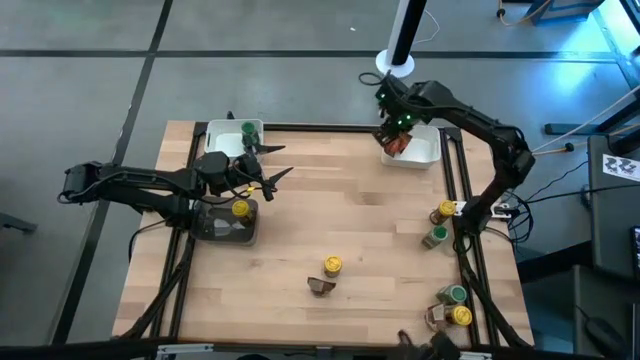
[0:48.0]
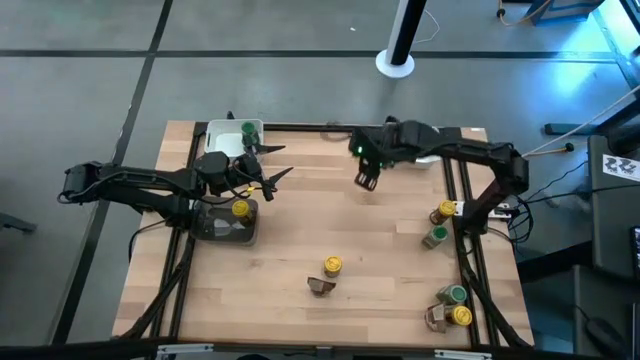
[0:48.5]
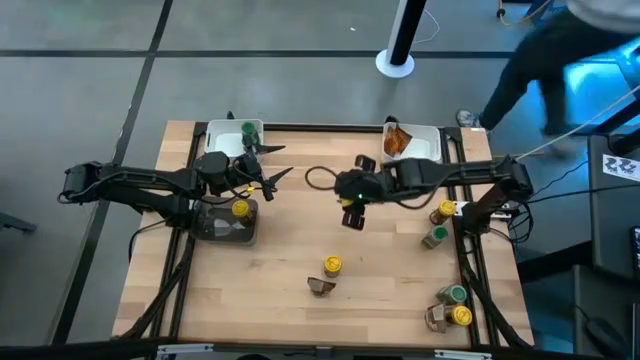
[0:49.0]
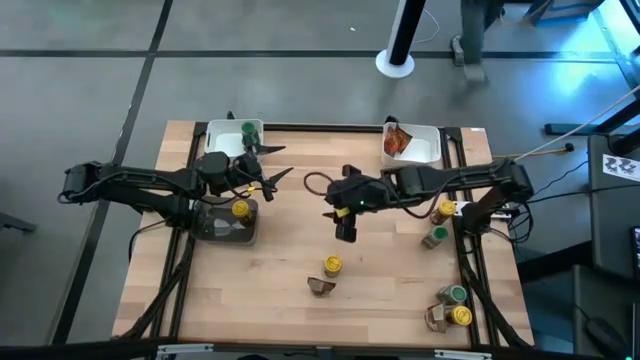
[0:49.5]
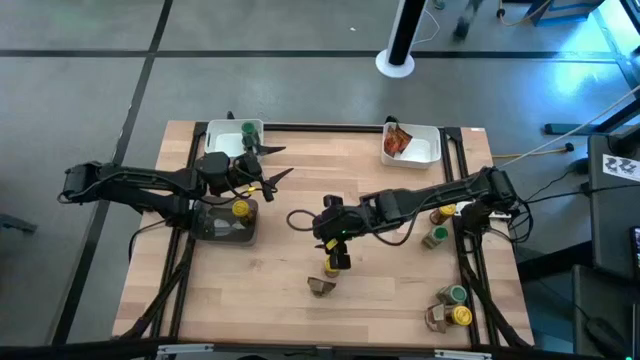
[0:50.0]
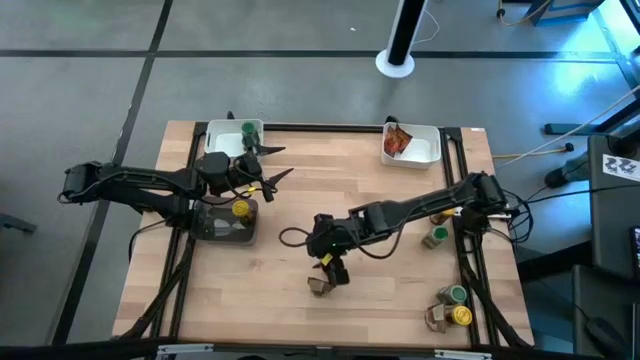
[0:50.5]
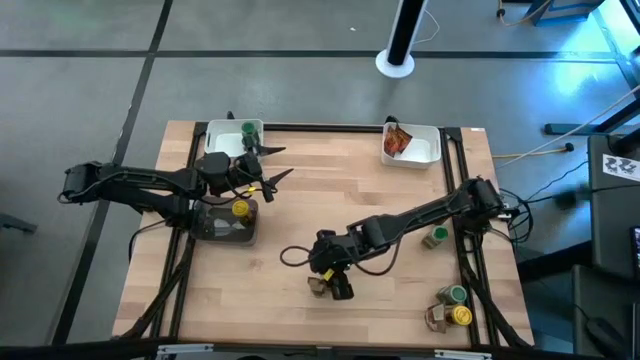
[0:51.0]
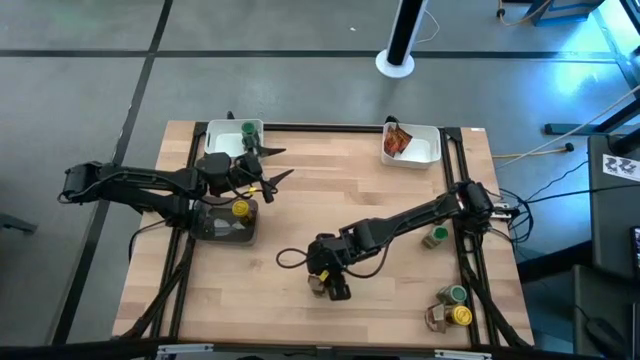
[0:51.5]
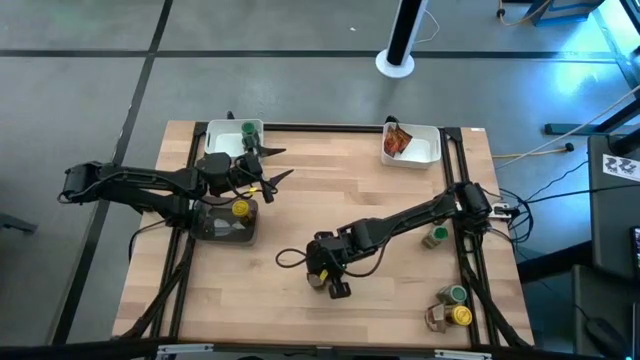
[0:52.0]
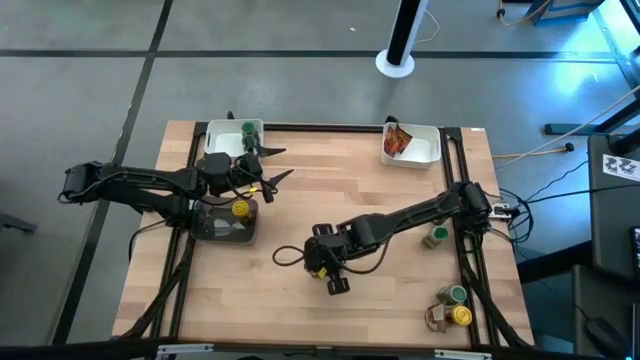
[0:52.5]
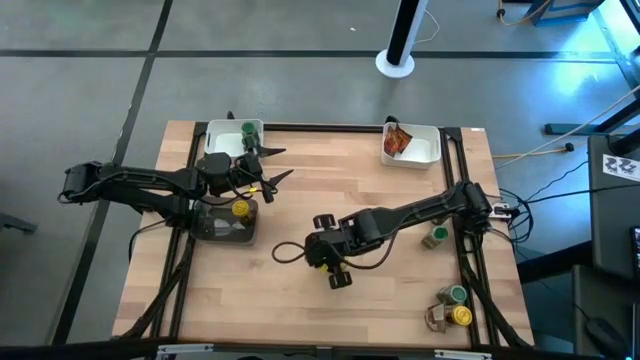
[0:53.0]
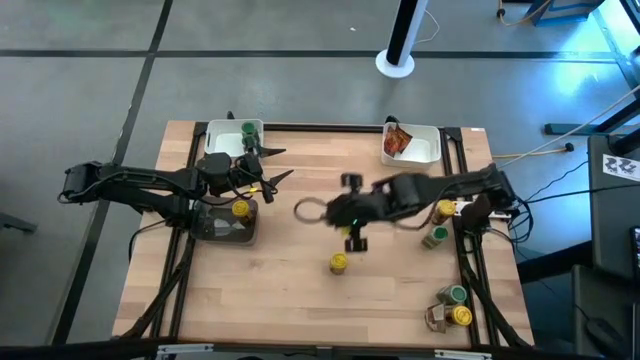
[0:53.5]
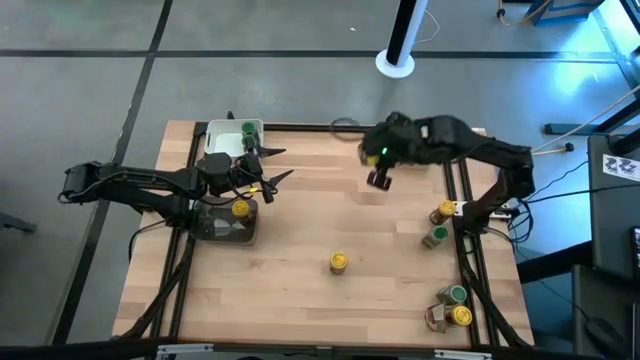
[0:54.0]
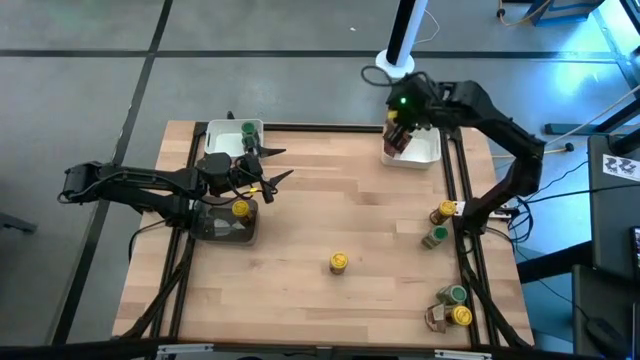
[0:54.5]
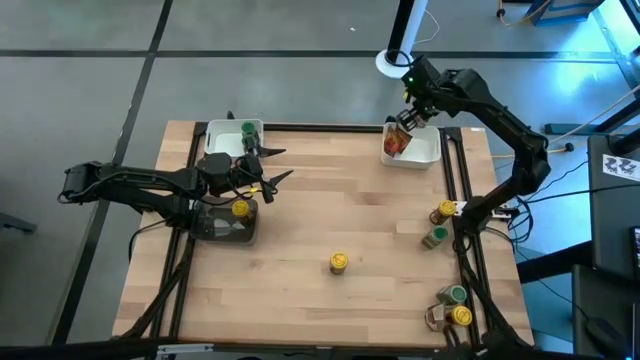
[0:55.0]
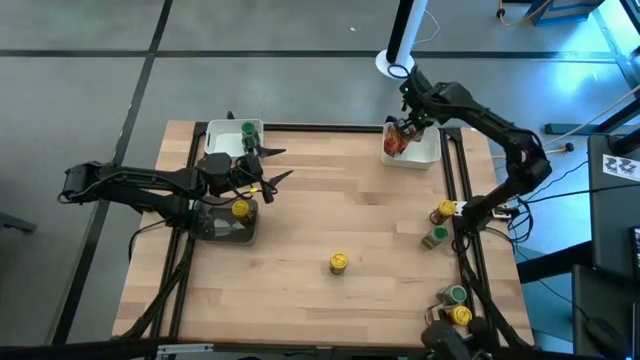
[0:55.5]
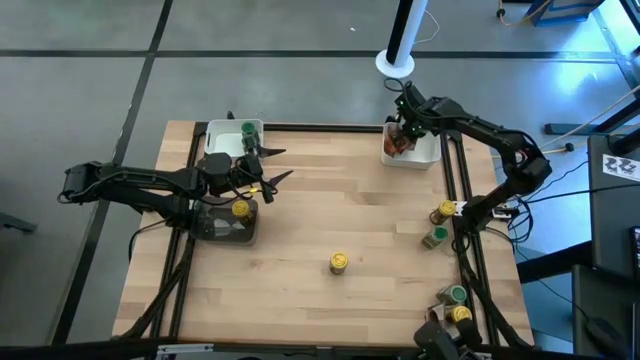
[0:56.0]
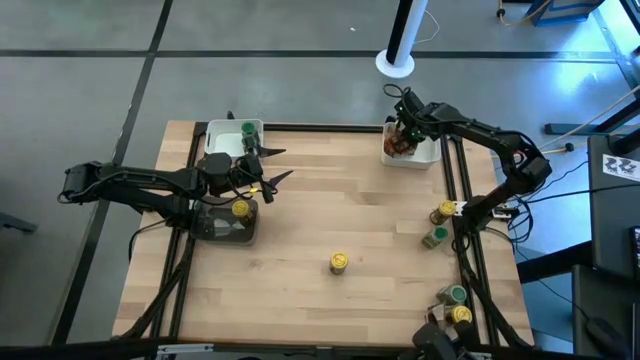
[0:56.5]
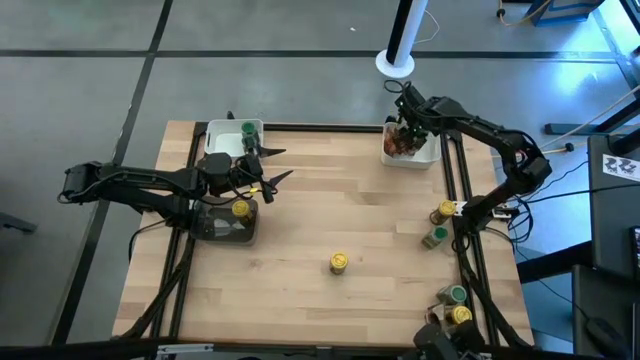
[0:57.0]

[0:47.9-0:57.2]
Task: Sort spices by type
Put the orange seasoning pack into the top right white bin

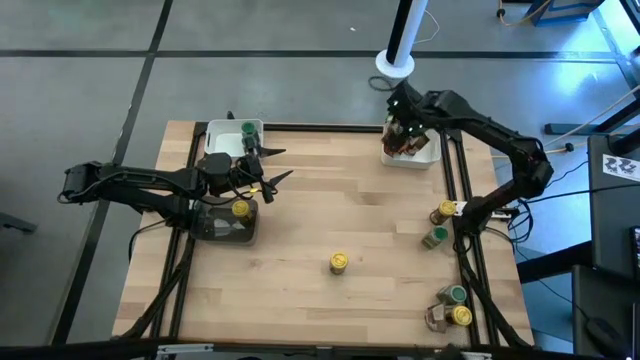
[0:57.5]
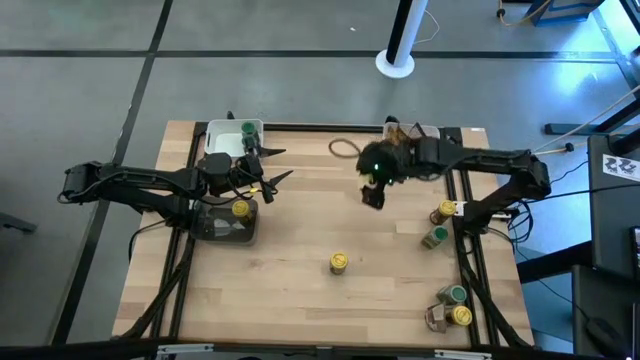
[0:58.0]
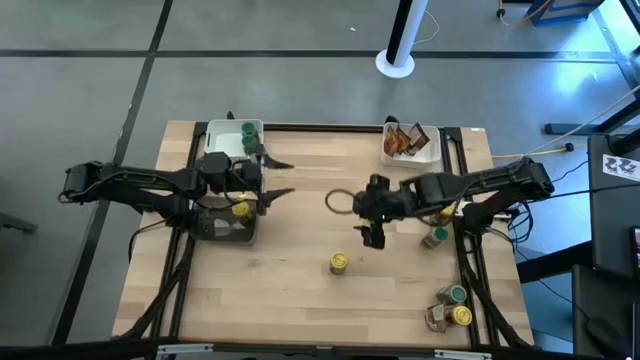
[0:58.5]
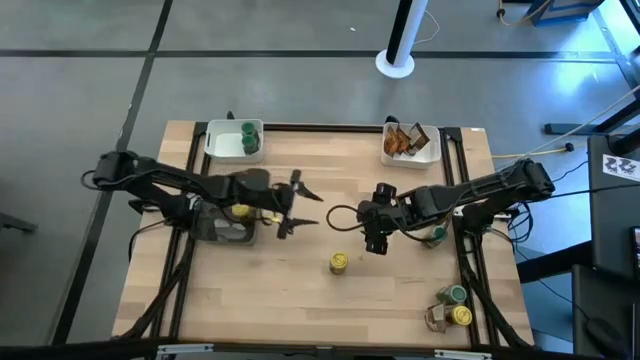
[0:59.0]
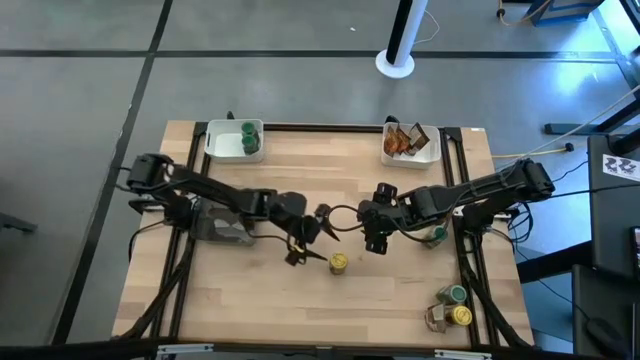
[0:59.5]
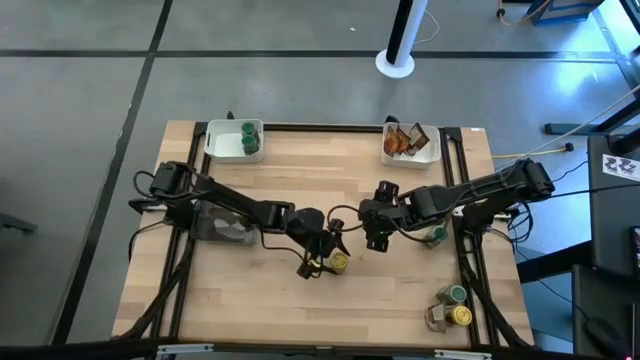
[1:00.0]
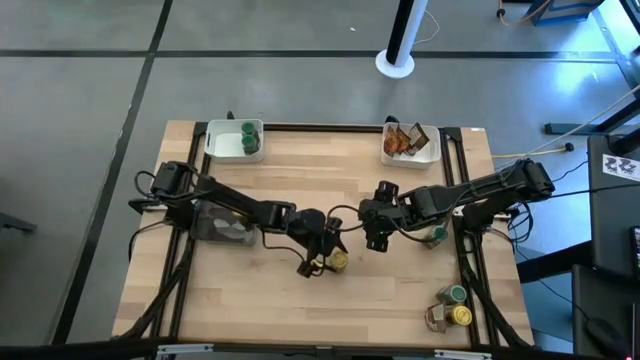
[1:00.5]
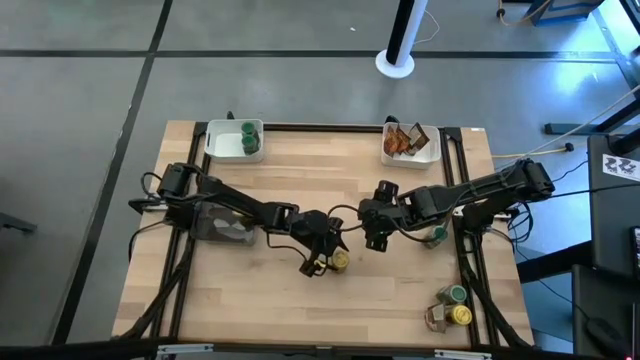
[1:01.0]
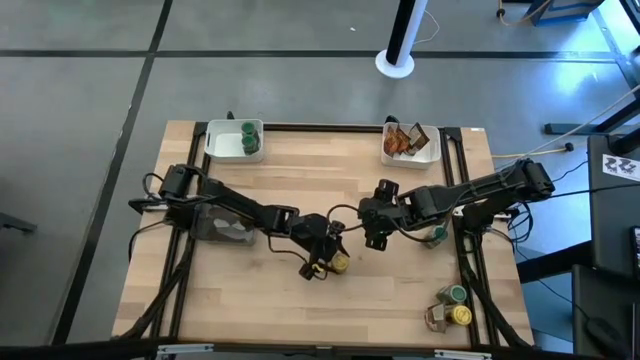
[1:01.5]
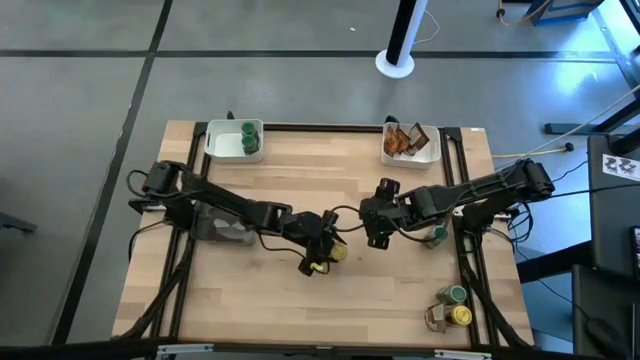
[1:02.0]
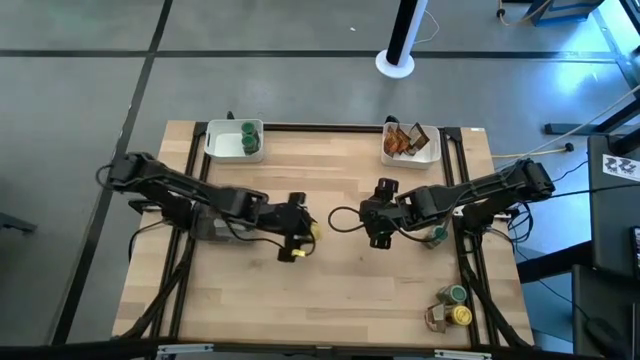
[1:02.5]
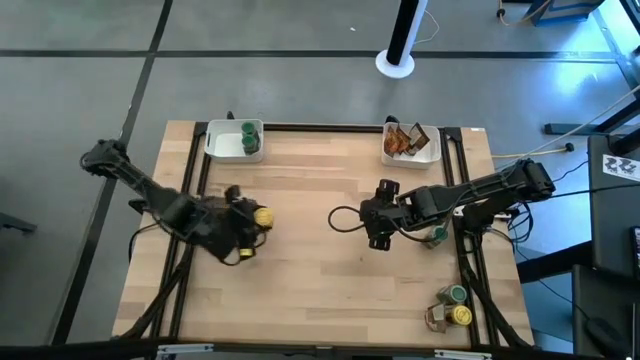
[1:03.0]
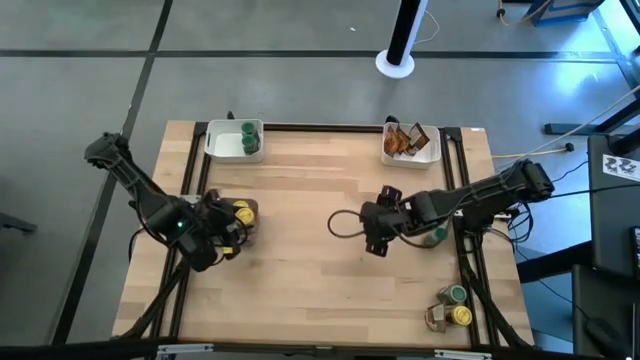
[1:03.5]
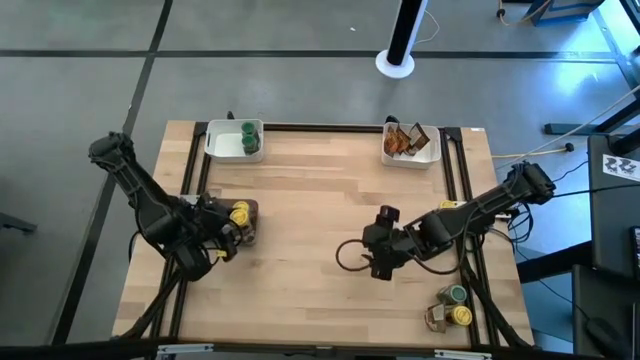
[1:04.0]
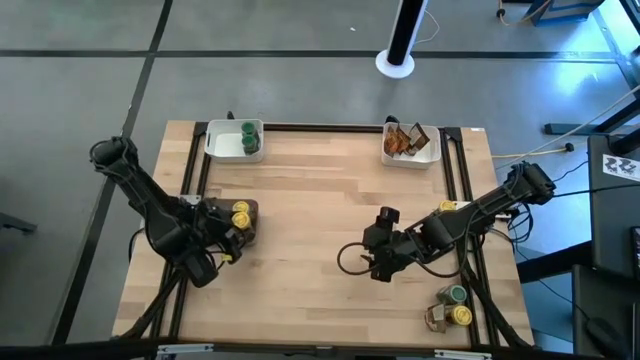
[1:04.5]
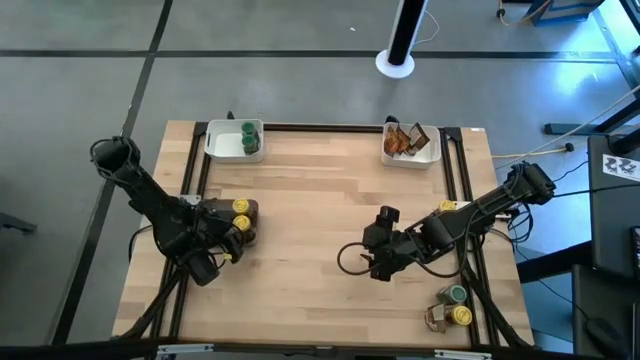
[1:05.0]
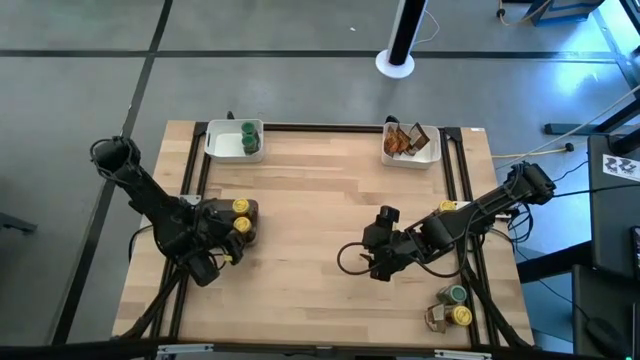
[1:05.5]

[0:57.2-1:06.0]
Put the yellow seasoning bottle into the black bin

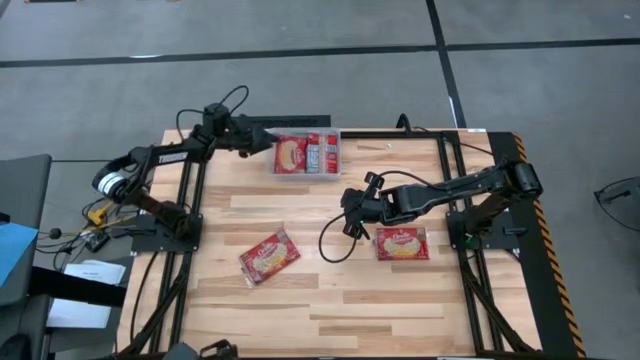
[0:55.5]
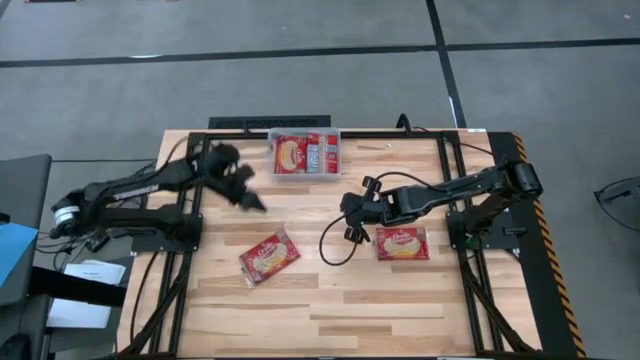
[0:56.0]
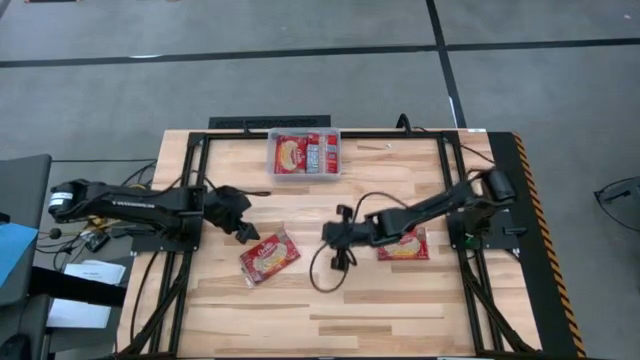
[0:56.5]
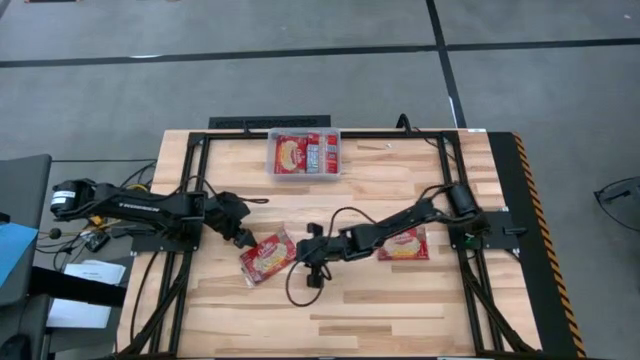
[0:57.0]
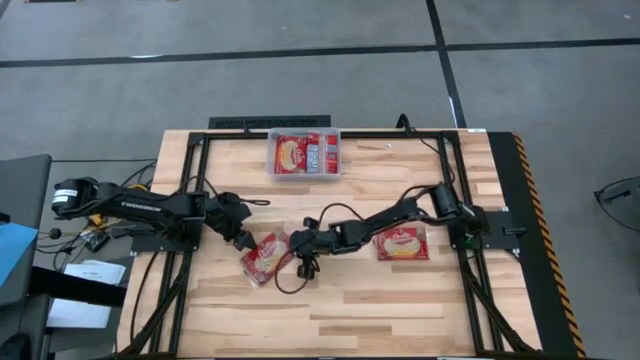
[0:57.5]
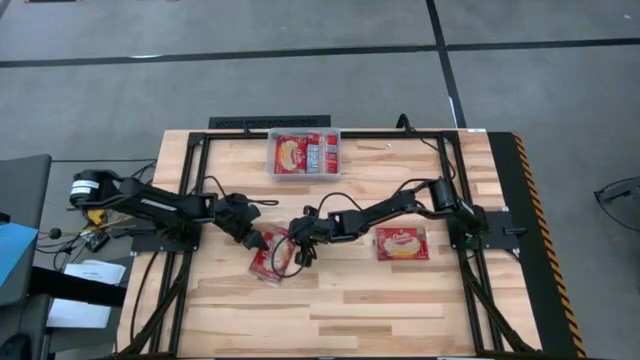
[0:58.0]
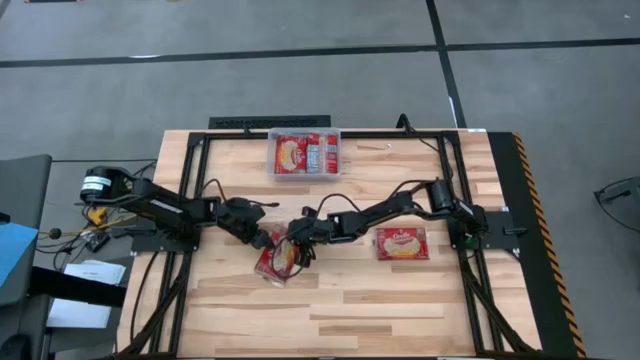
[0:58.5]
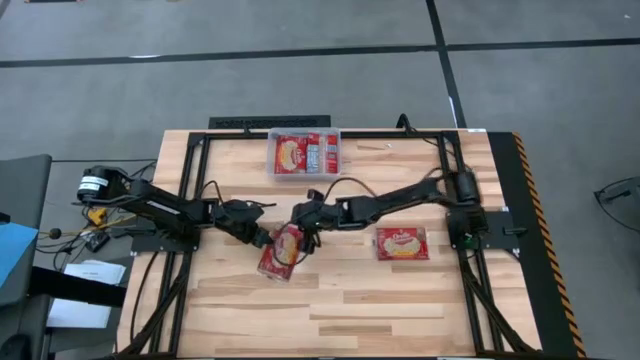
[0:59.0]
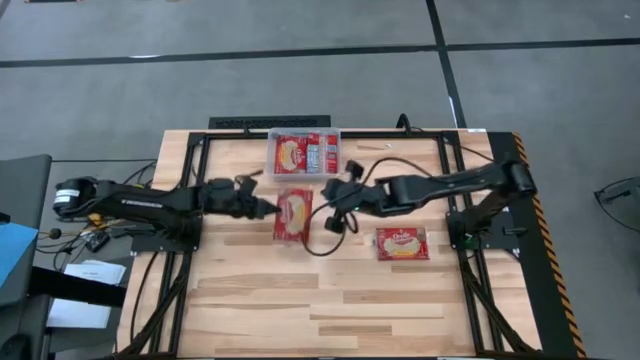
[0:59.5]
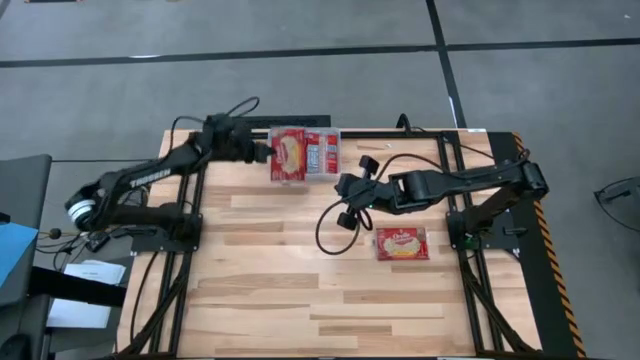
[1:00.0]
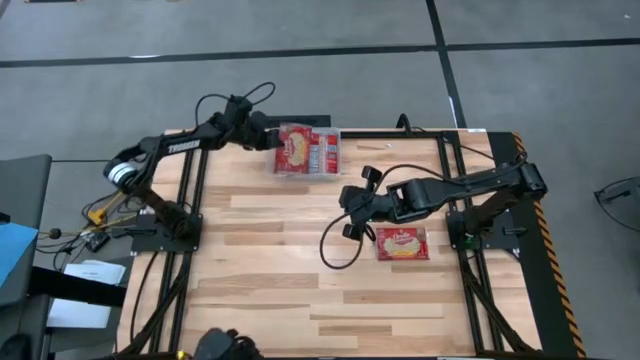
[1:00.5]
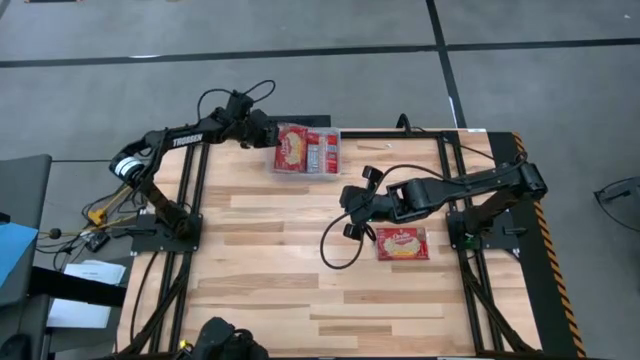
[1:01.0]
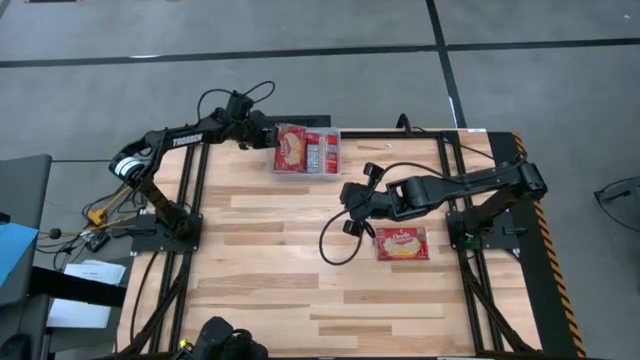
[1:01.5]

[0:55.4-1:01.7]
Task: Sort popcorn bags into baskets
Put the red popcorn bag into the transparent bin
